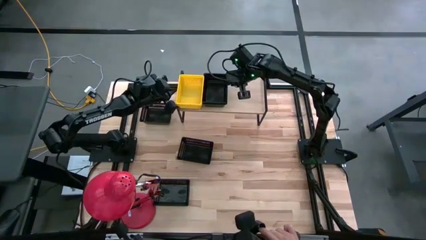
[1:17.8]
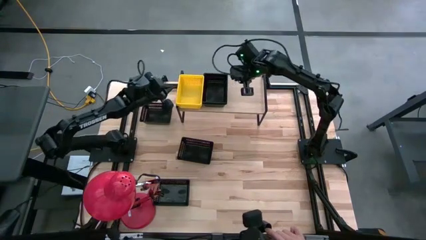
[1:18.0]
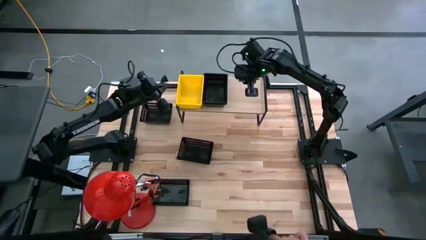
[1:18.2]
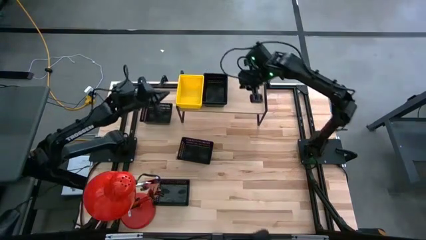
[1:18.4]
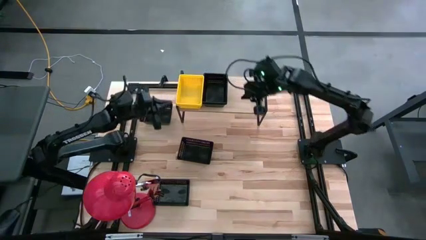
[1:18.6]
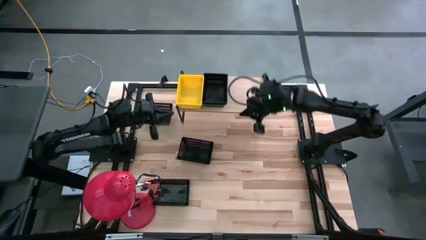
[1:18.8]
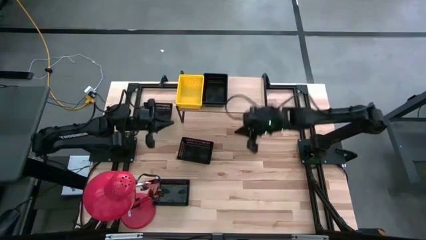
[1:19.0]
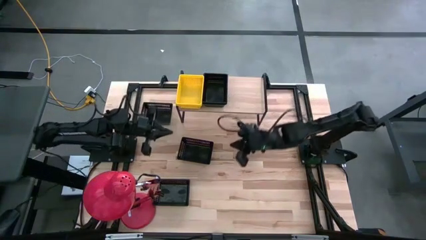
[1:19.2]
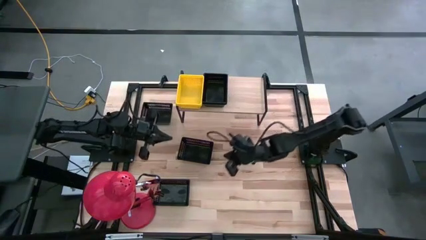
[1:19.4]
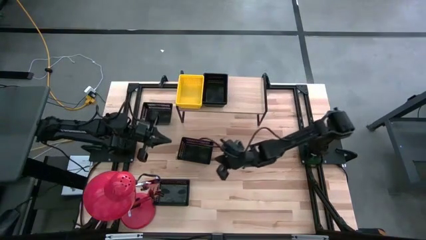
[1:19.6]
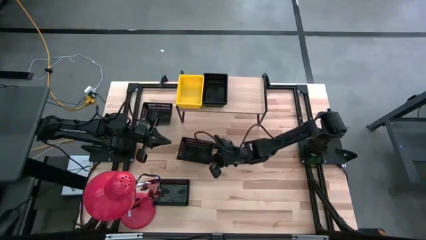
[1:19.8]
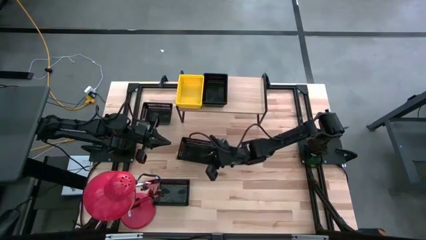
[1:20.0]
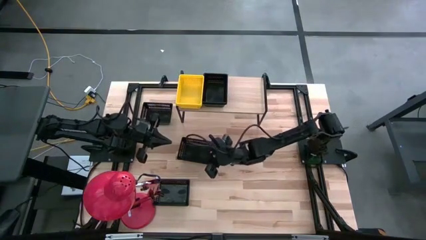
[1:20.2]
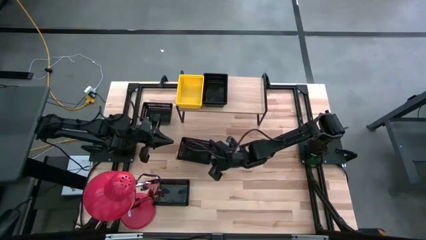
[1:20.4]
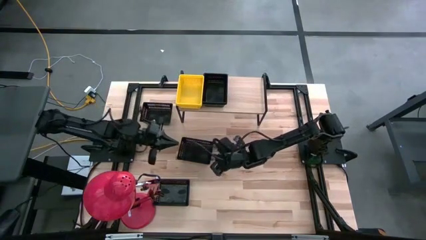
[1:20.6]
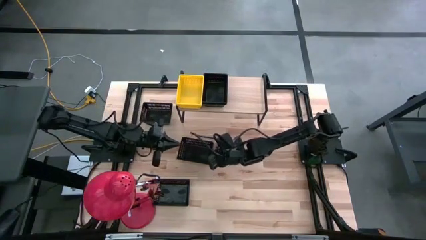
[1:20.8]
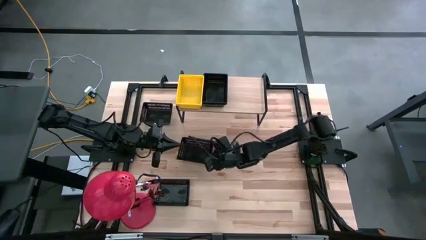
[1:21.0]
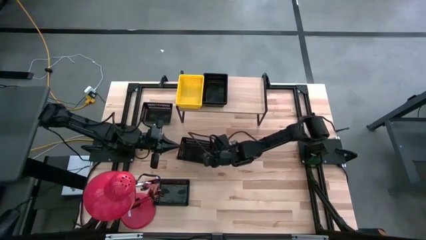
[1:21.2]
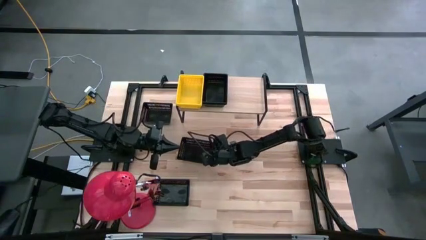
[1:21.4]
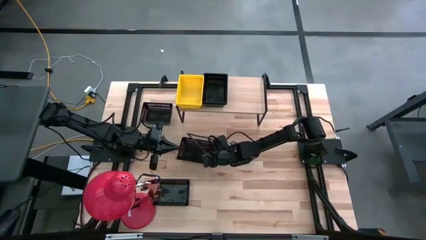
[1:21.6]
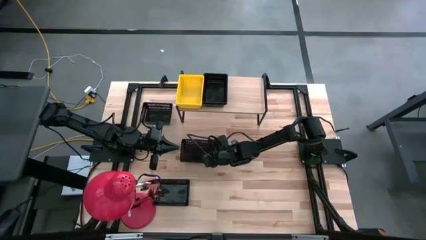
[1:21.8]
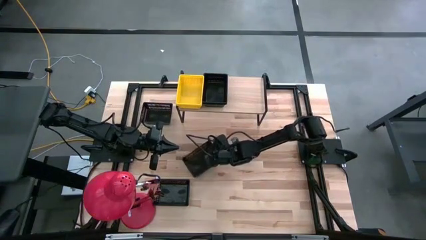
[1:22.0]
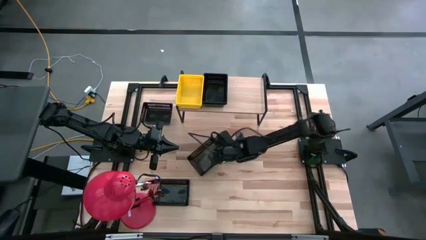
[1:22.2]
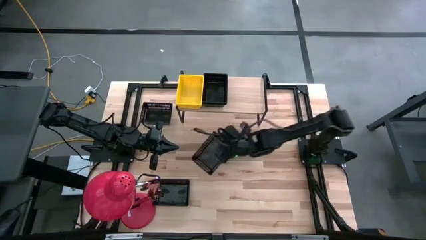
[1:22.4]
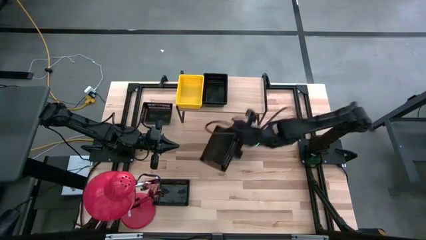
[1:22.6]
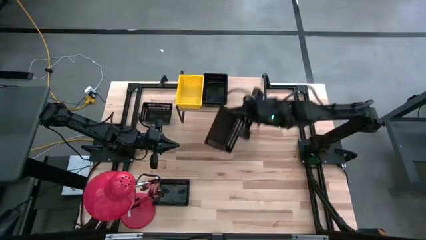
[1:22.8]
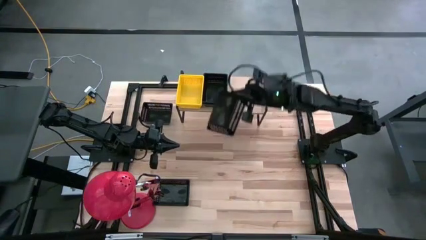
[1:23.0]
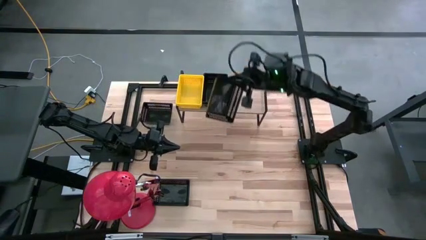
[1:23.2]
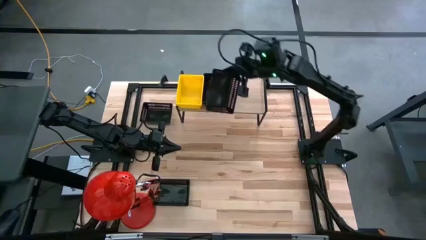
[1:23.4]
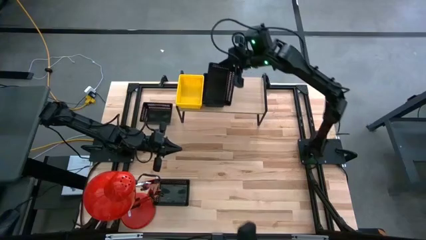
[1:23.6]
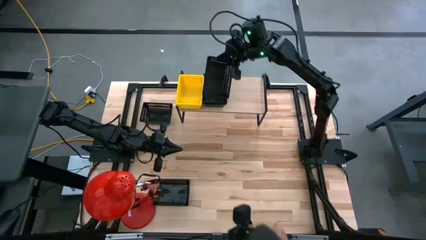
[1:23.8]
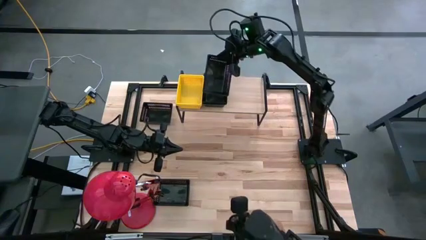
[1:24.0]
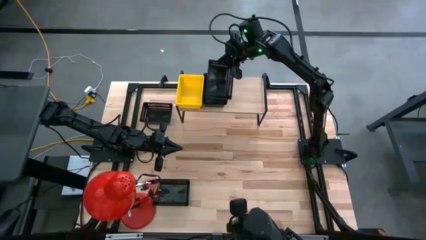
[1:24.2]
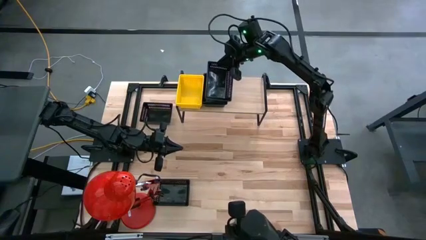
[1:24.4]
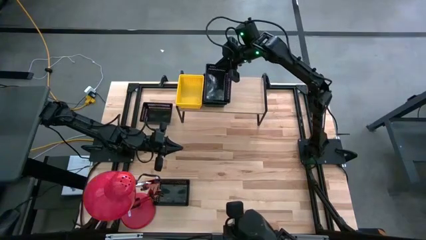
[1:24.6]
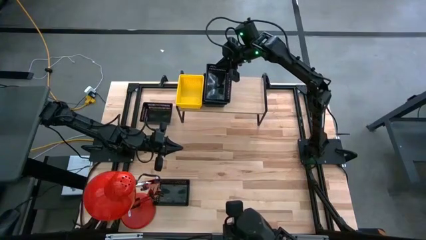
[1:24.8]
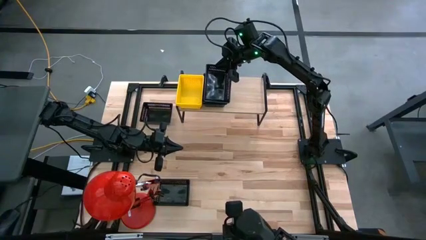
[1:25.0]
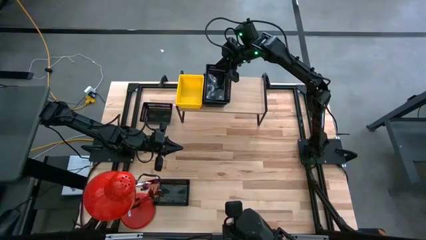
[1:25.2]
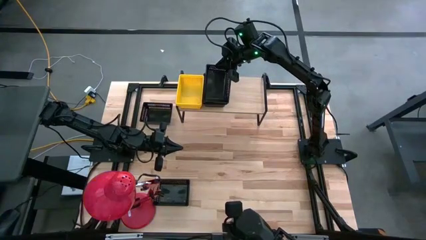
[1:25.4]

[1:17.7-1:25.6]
Task: Stack baskets on shelf by color
Stack the black bin on the black bin on the shelf

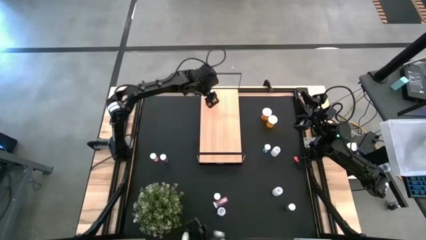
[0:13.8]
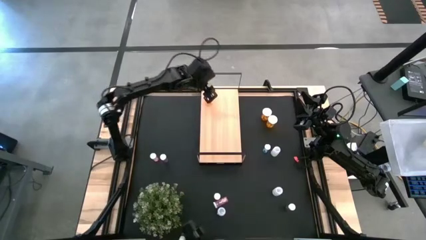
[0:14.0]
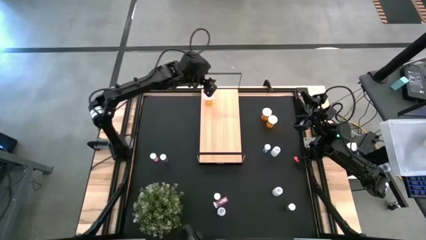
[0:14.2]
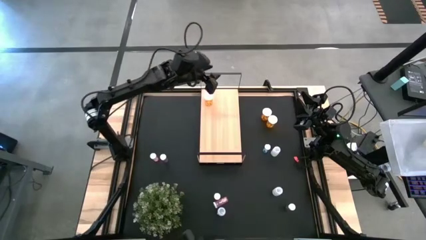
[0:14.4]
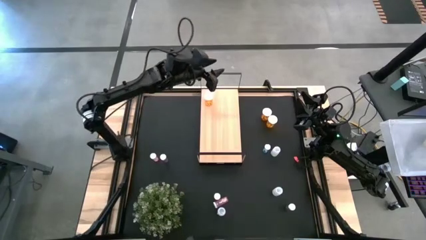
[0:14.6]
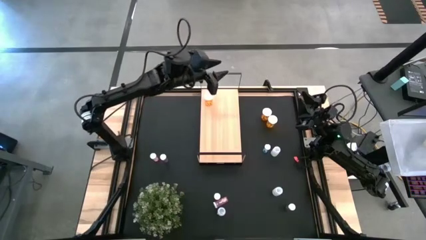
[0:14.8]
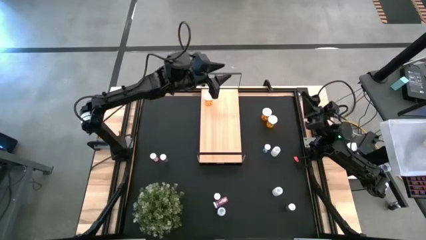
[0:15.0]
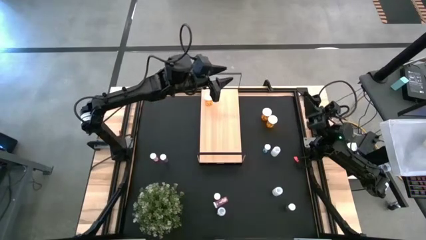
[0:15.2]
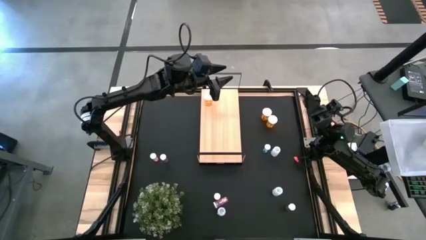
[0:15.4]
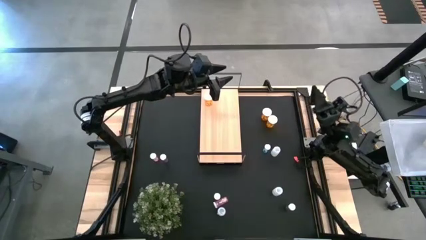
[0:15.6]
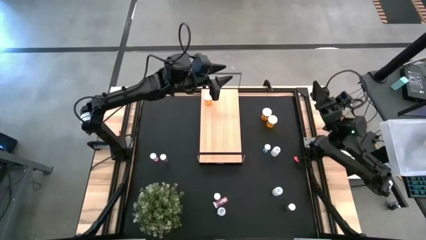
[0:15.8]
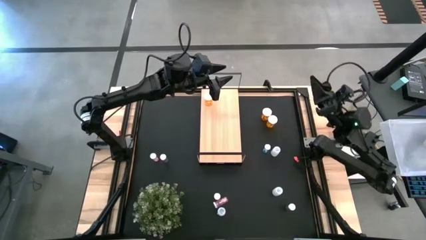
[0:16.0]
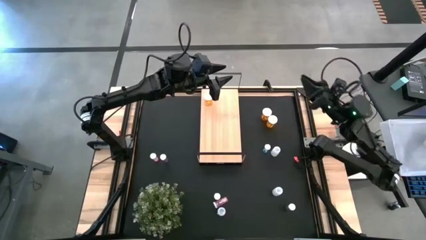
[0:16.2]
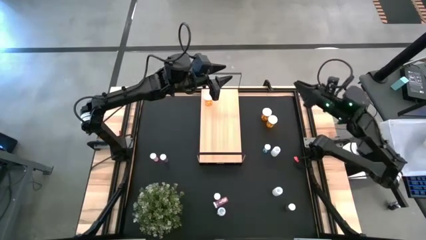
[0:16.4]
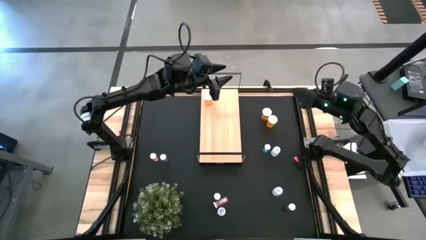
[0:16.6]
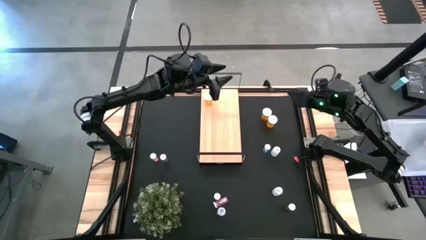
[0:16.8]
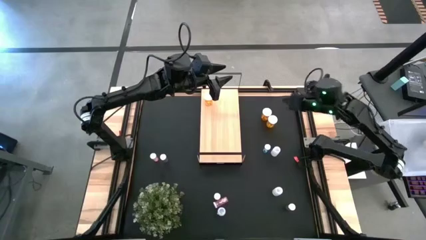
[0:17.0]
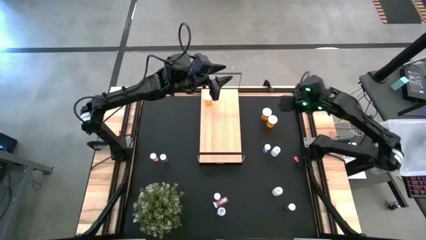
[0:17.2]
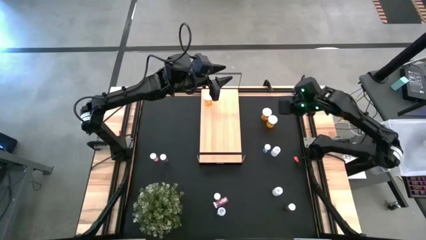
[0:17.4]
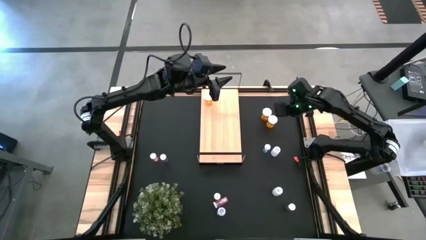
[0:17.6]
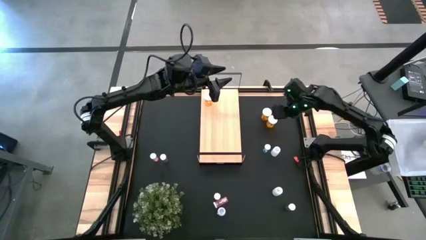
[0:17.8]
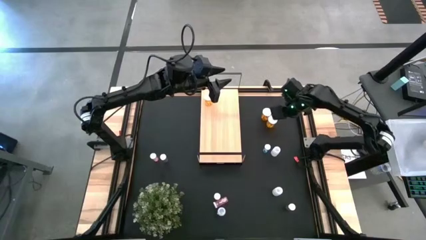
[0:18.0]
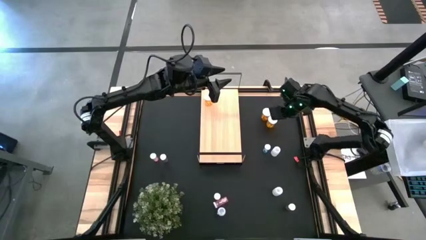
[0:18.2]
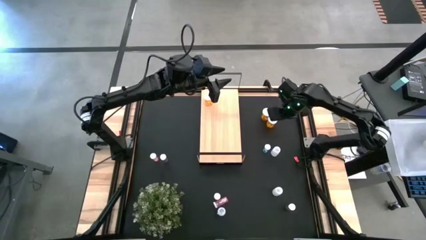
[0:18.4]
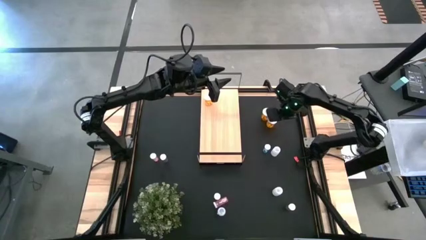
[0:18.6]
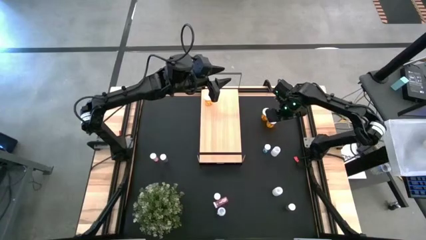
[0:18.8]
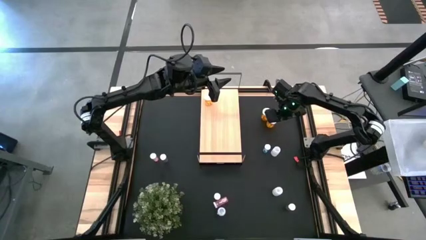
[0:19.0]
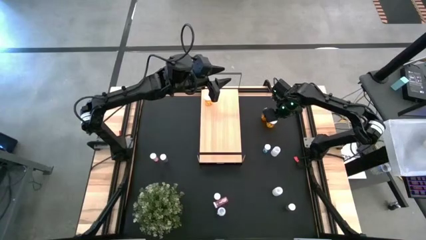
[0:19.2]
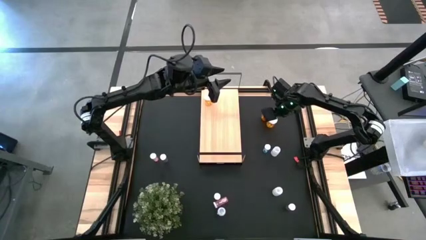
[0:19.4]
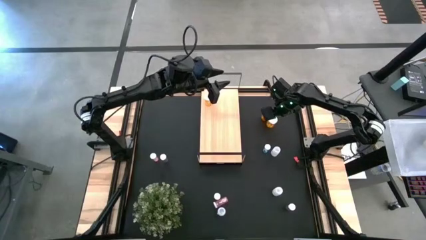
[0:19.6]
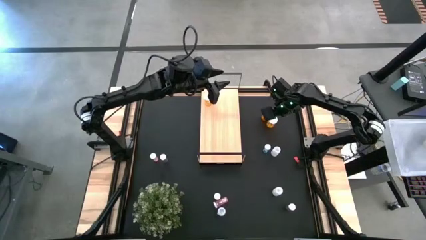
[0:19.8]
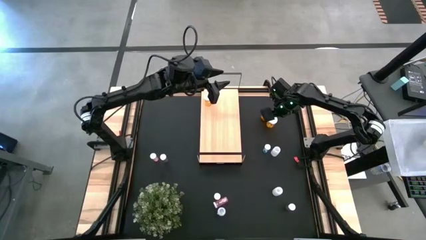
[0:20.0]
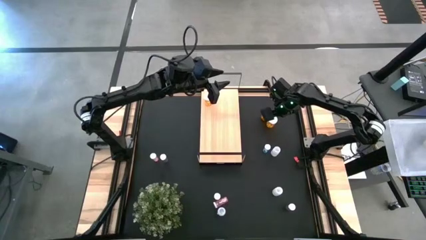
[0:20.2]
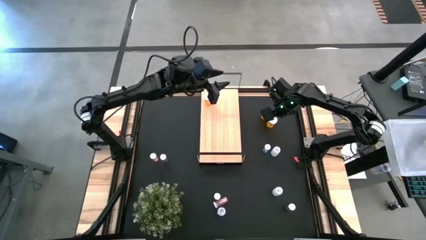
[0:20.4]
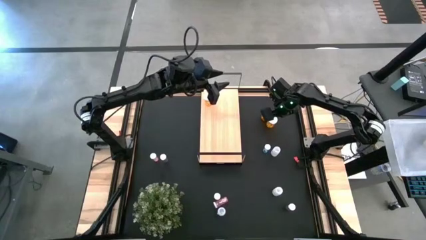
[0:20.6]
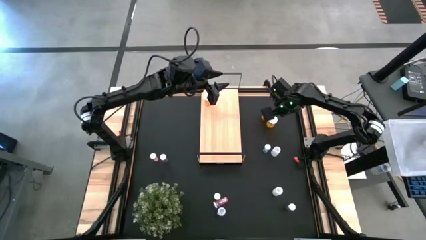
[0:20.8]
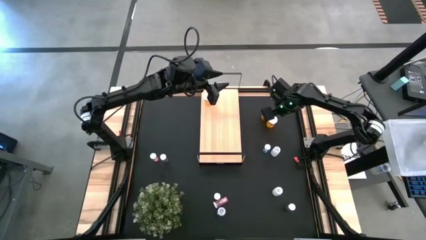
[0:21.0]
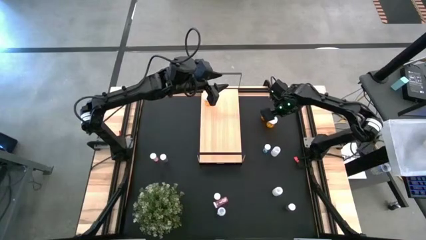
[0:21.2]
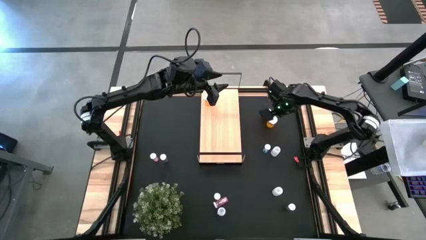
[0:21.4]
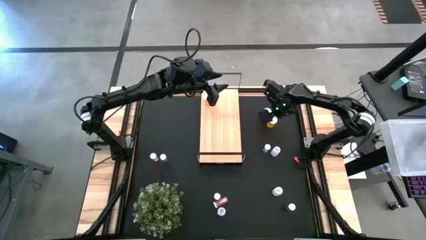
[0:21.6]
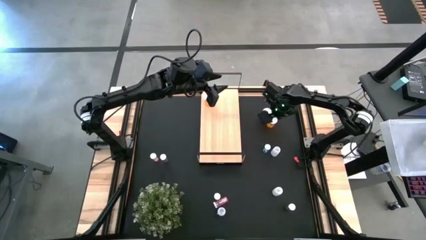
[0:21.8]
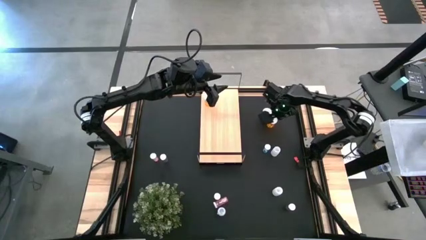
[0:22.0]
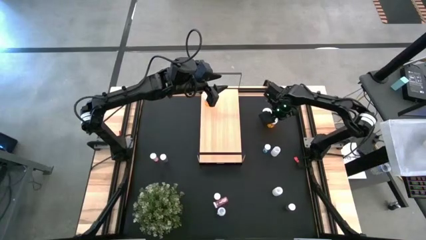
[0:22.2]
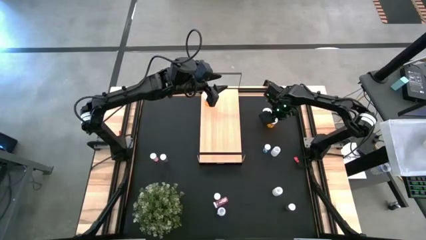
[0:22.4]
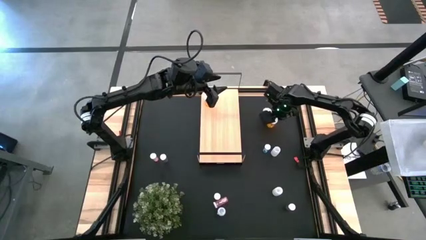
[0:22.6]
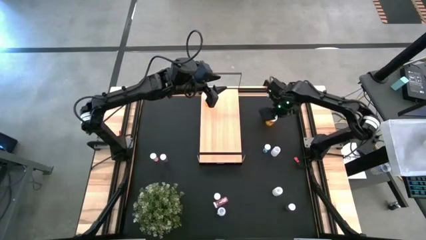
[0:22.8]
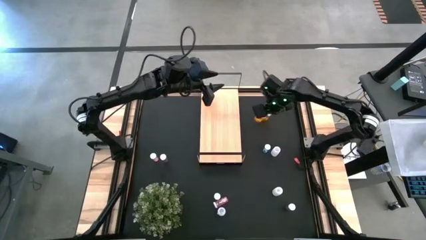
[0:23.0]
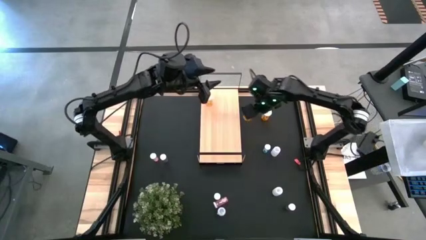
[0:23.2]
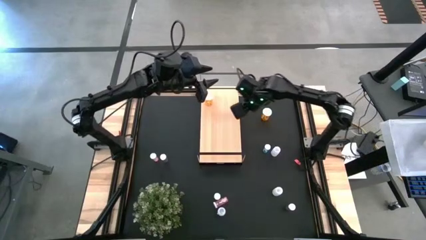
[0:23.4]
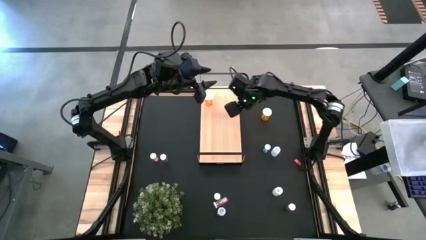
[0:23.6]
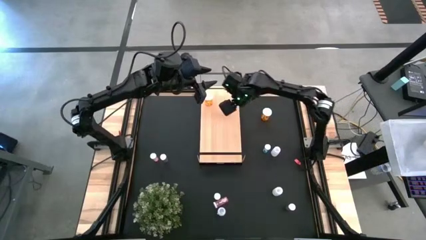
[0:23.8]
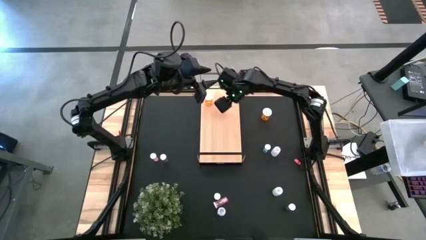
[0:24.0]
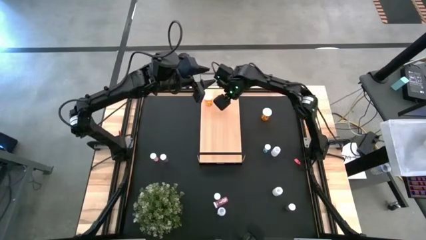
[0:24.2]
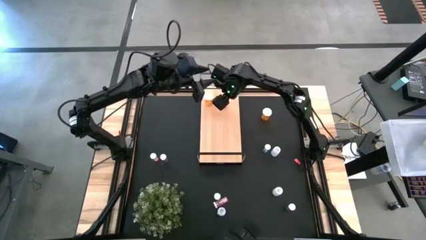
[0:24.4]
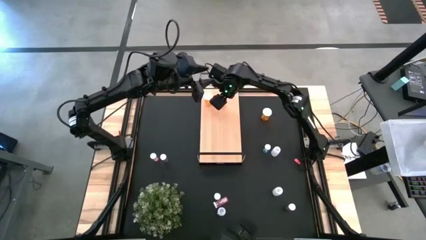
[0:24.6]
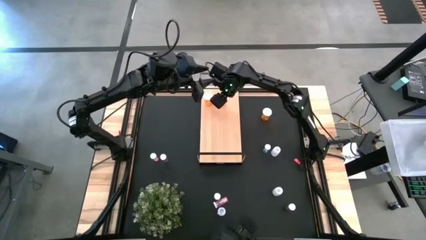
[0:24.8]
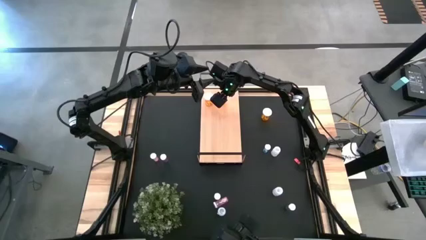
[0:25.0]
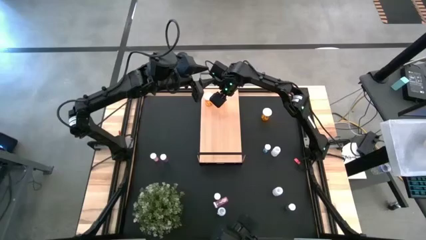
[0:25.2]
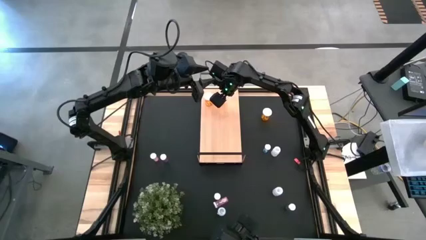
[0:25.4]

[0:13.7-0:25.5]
Task: Pick and place medicine bottles onto shelf by color
Put the bottom orange pill bottle aligned with the other orange pill bottle on the shelf
